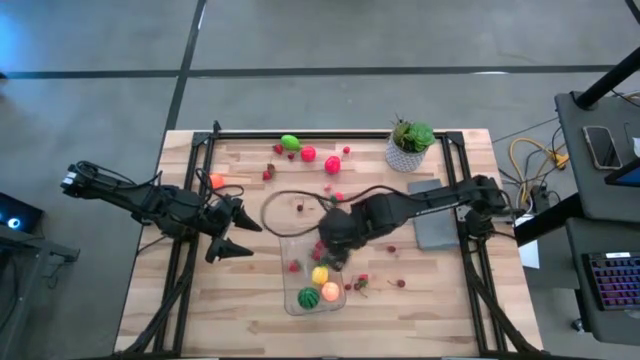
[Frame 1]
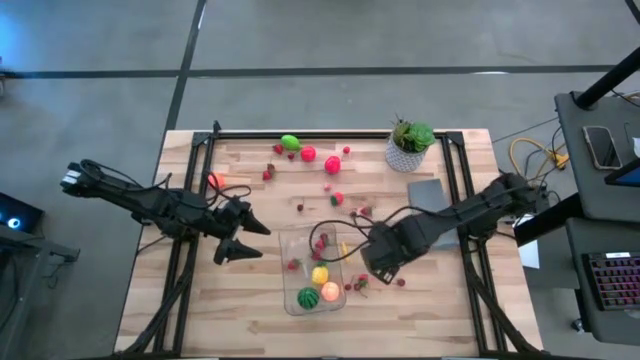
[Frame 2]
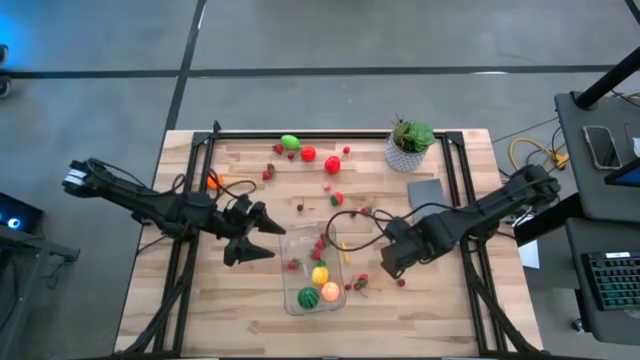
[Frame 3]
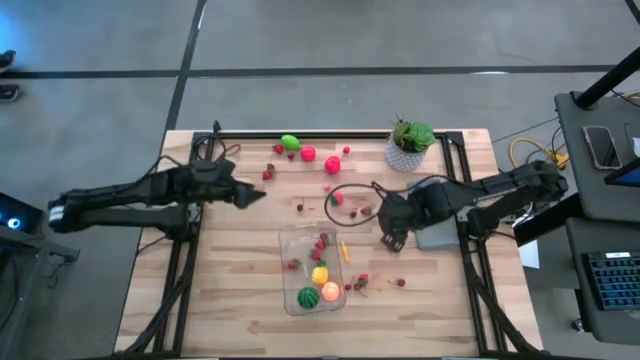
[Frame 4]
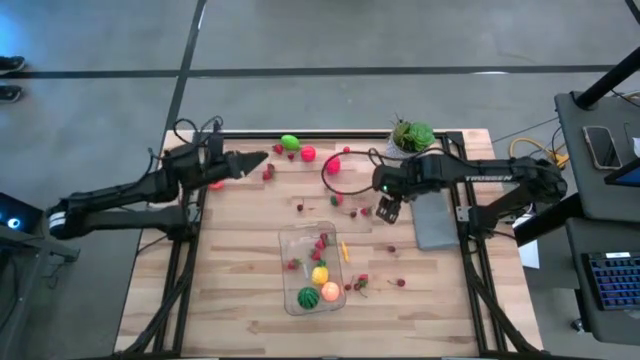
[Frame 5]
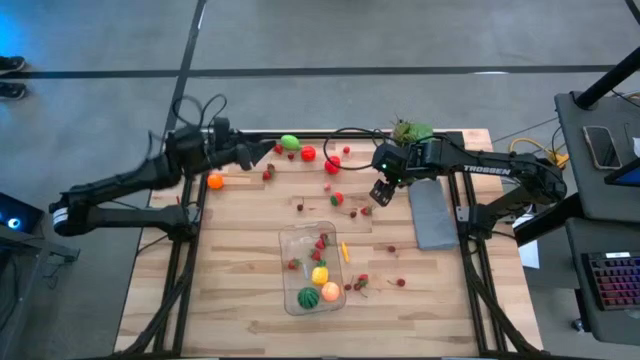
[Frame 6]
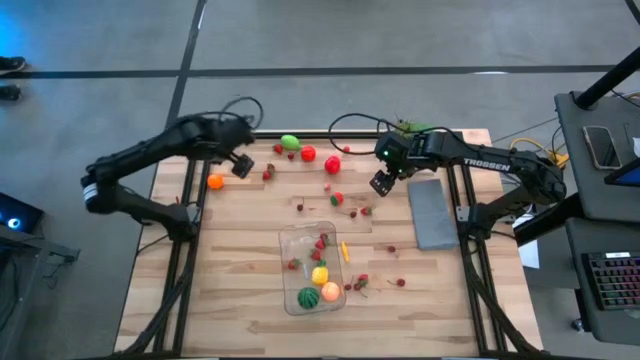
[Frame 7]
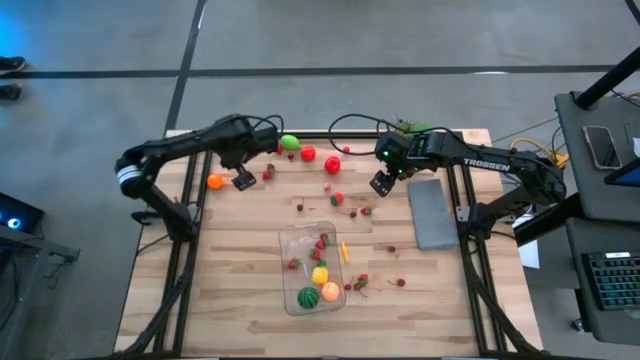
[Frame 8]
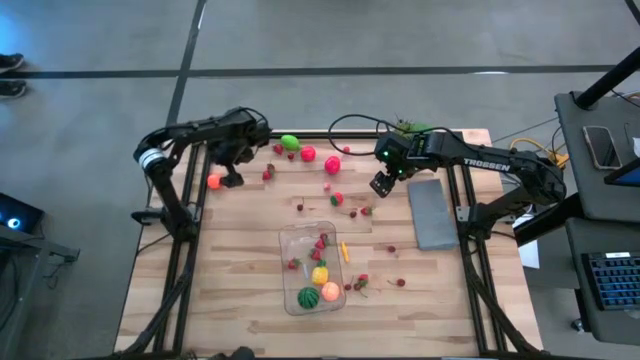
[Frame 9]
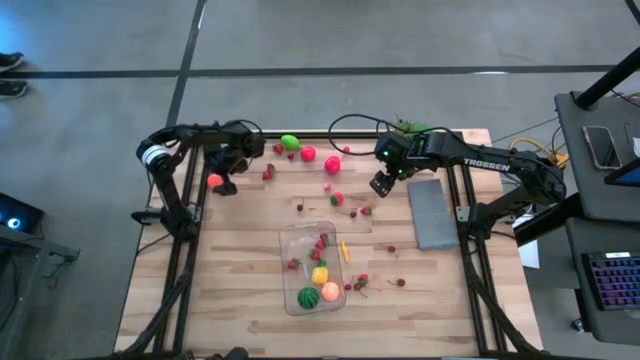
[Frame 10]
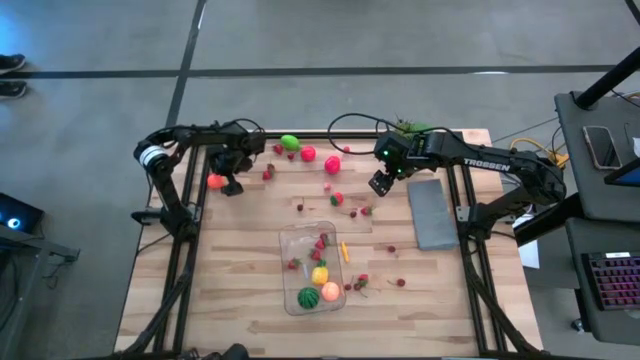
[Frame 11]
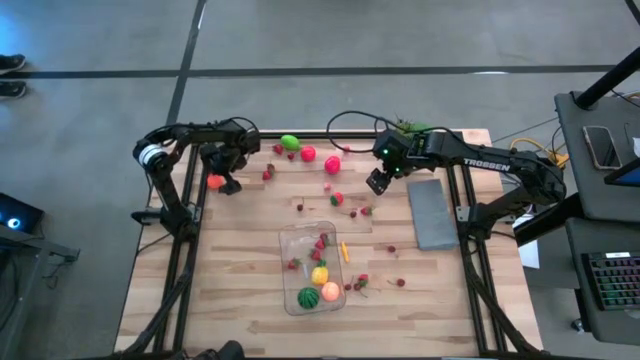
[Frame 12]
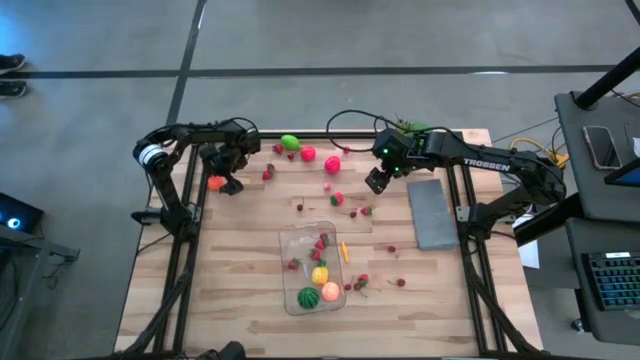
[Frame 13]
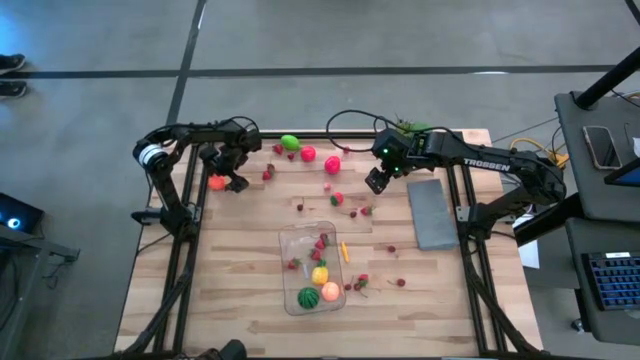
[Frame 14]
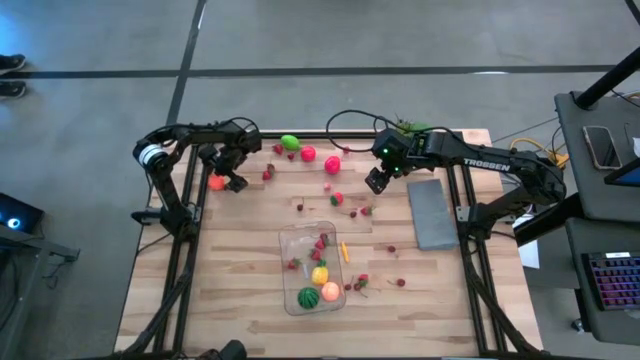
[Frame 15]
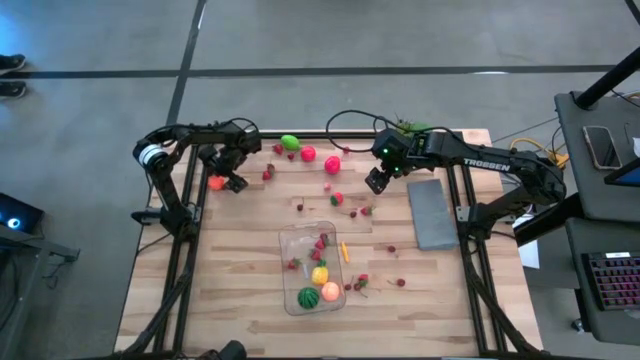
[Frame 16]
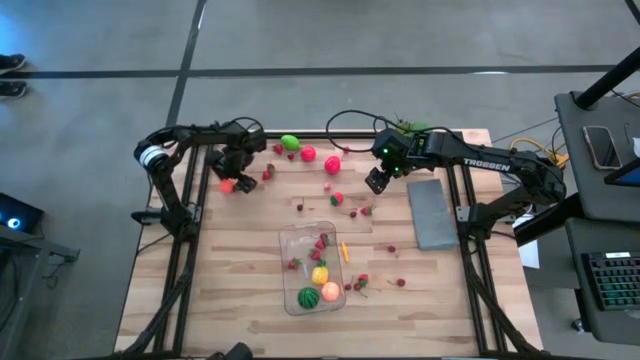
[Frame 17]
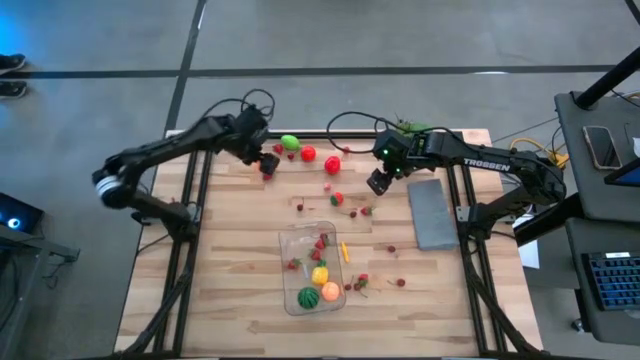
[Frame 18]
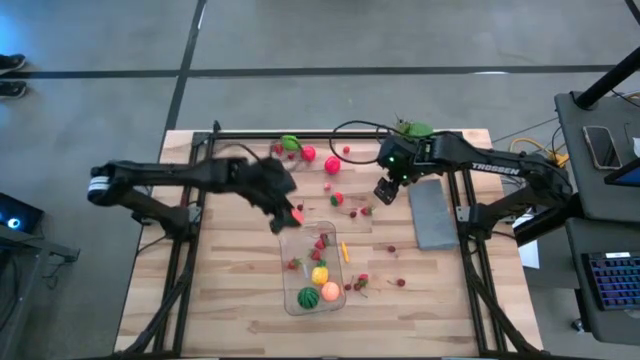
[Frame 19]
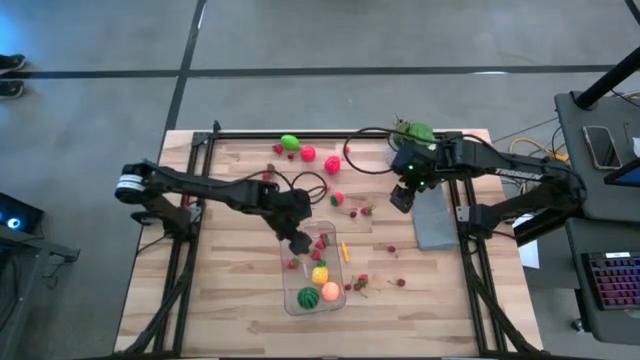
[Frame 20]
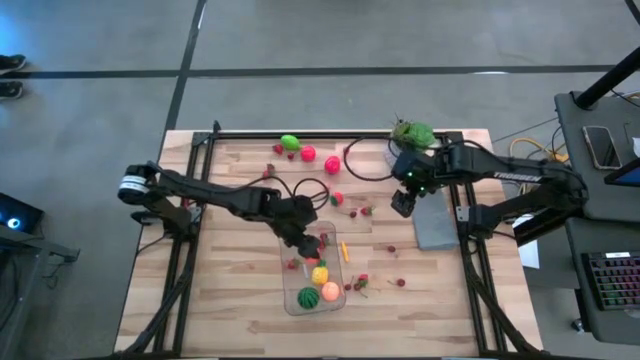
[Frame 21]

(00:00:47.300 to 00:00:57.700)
Task: Pick and placing Produce into tupperware
Put the orange pumpkin into the transparent bin

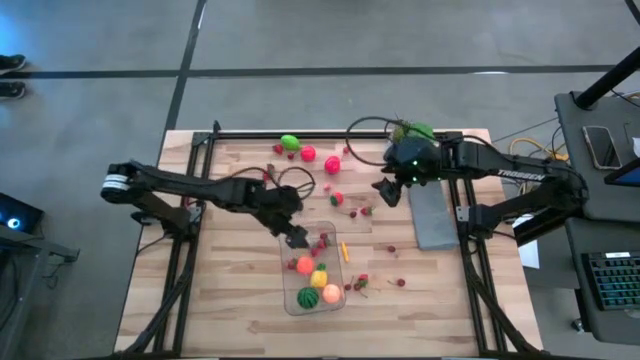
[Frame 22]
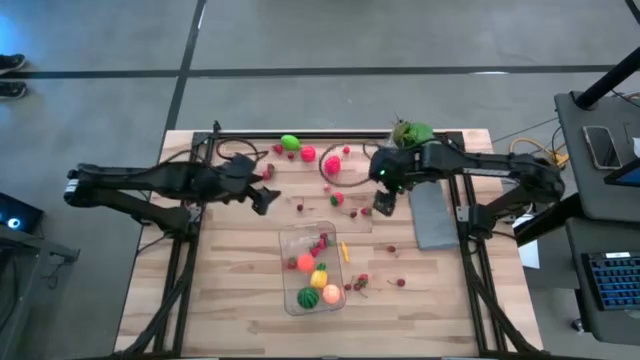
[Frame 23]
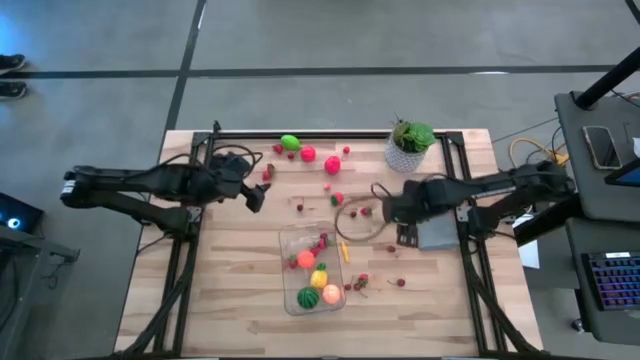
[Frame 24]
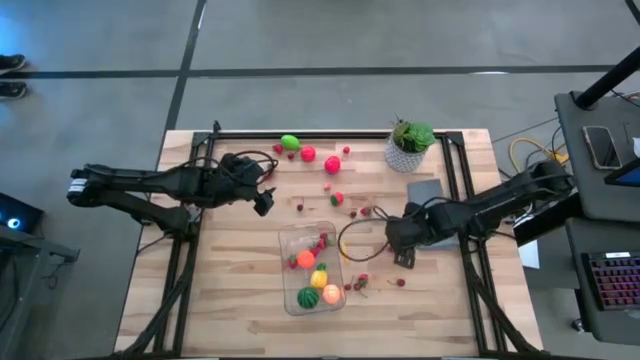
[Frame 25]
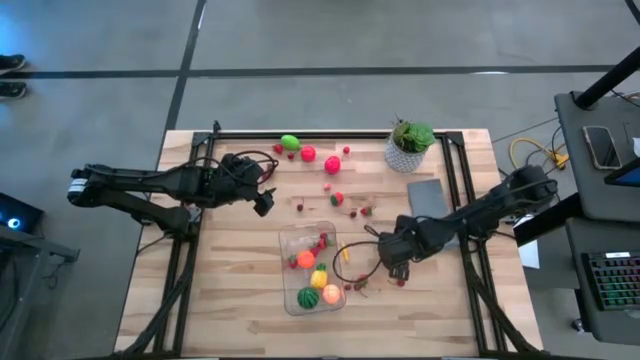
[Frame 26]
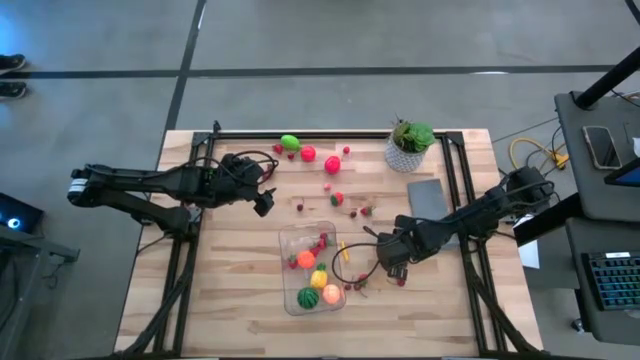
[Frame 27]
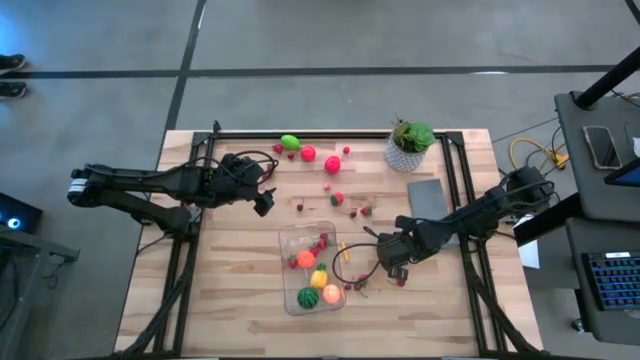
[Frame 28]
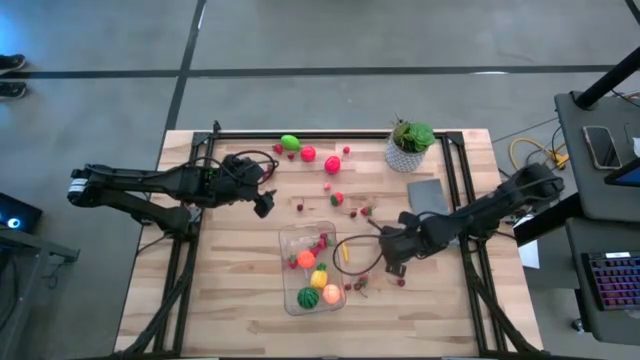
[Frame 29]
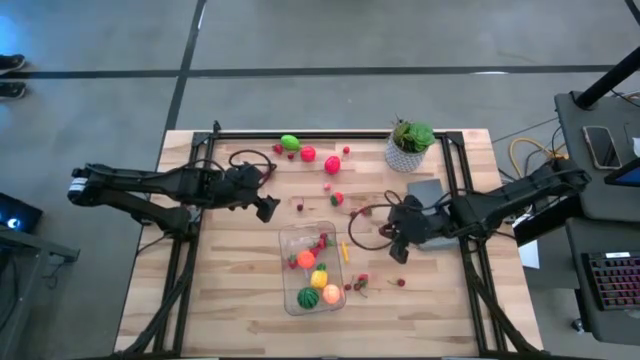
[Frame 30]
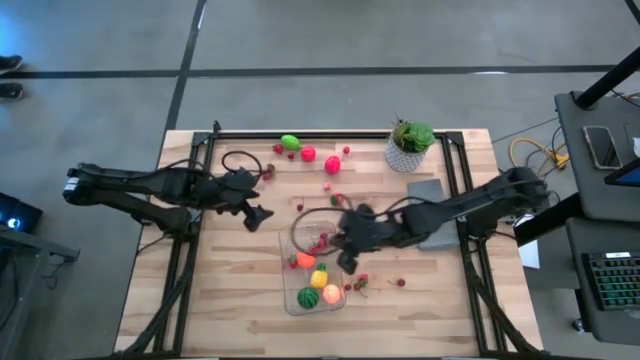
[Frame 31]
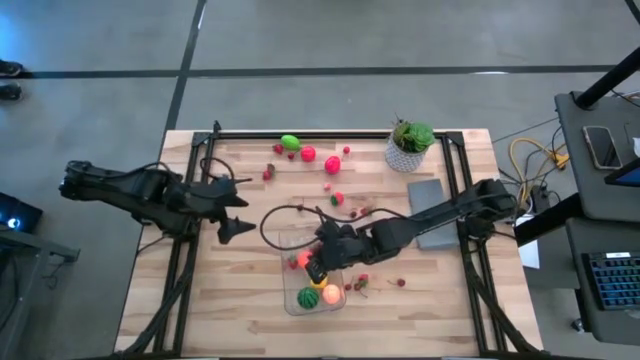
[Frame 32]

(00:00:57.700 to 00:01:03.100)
Put the red cherry into the transparent bin

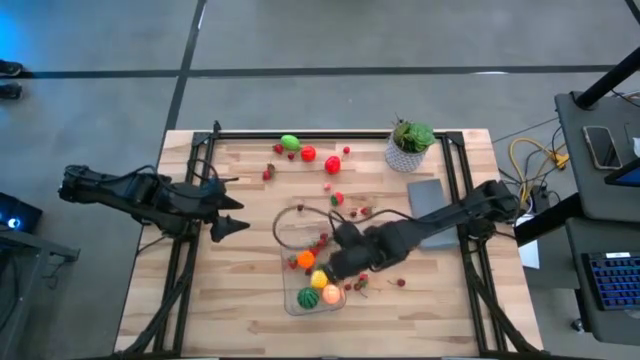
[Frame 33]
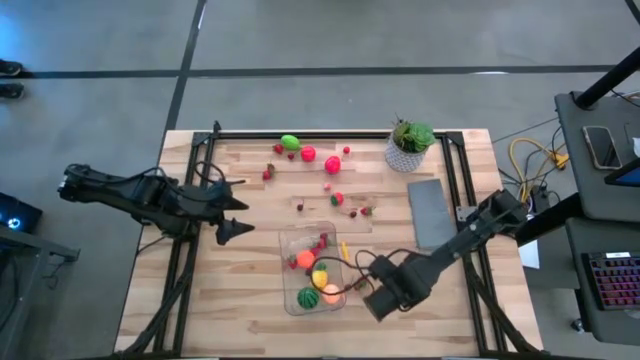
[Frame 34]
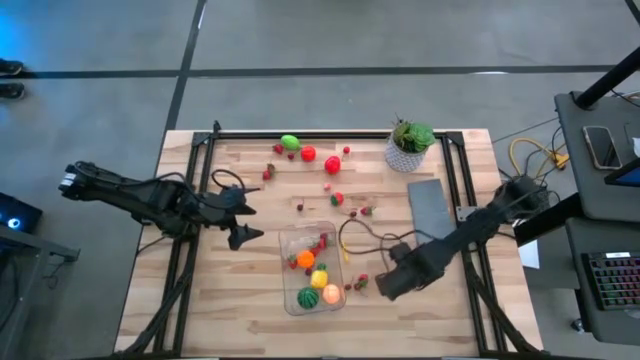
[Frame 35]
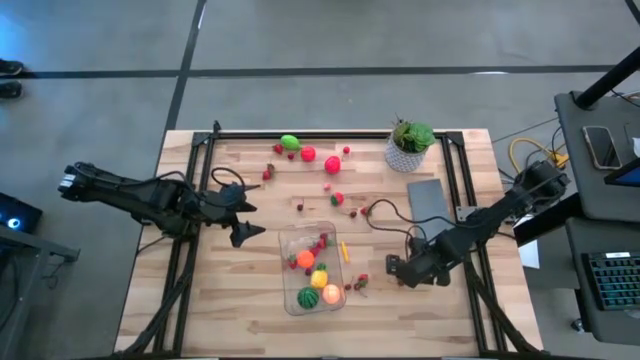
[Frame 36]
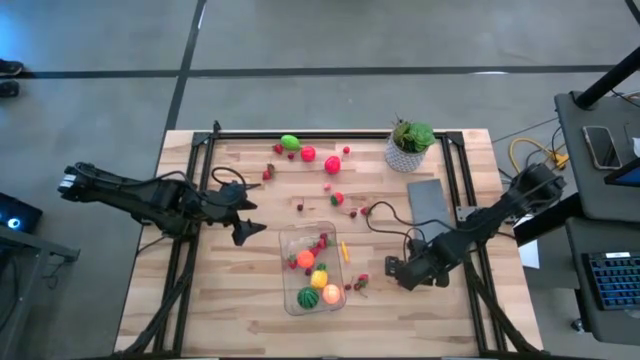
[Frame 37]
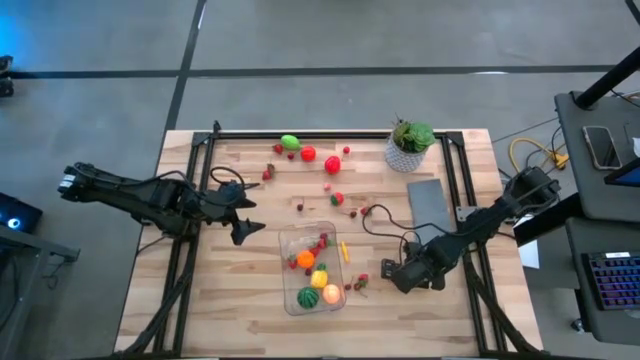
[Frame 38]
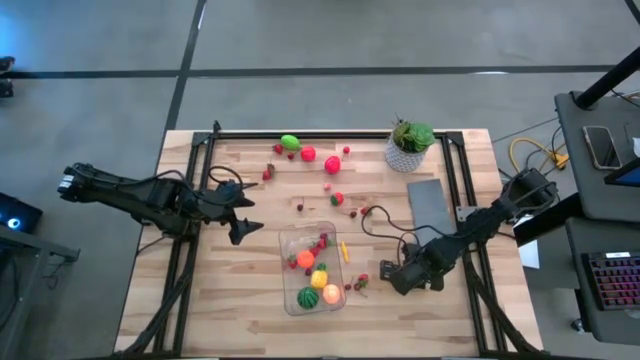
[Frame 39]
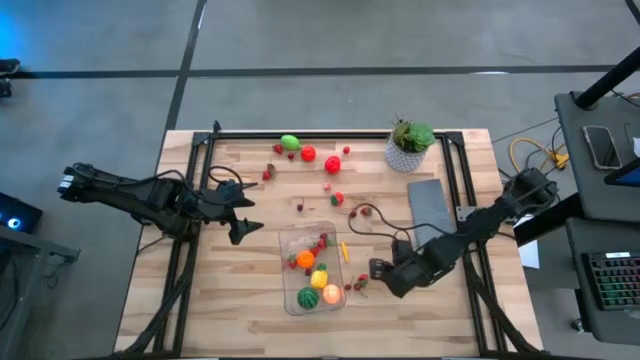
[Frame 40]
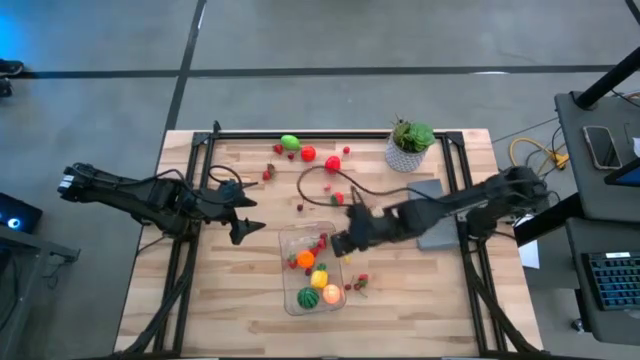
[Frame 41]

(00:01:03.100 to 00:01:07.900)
Put the red cherry into the transparent bin
